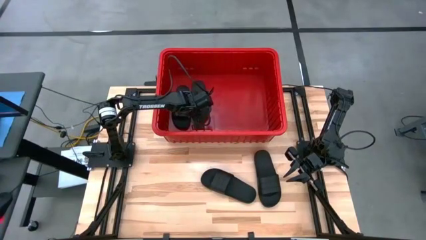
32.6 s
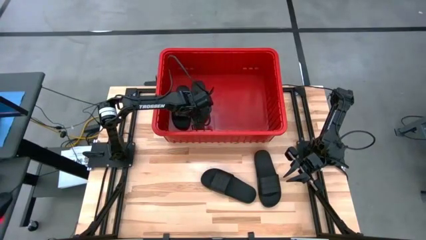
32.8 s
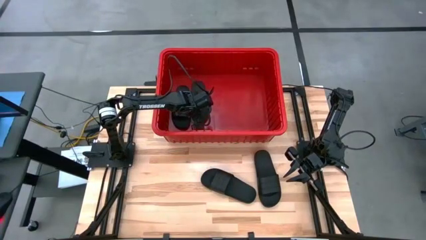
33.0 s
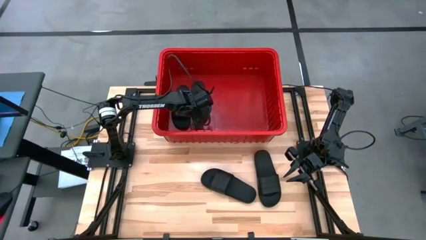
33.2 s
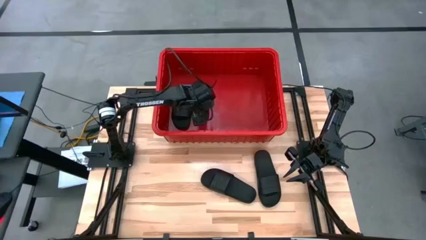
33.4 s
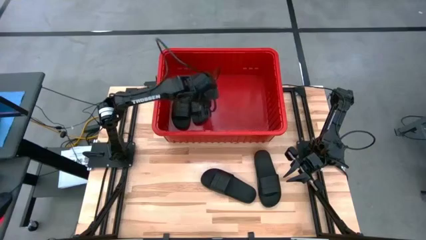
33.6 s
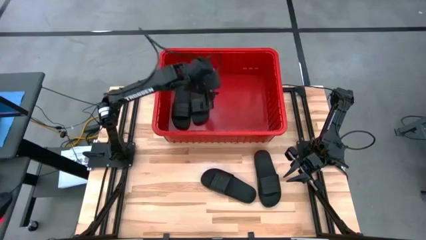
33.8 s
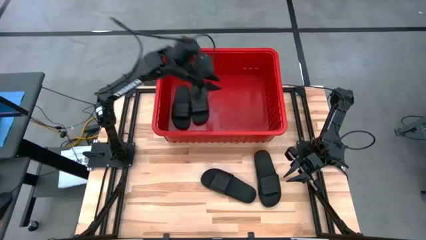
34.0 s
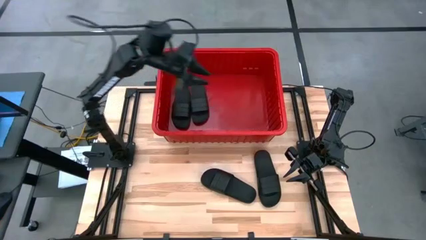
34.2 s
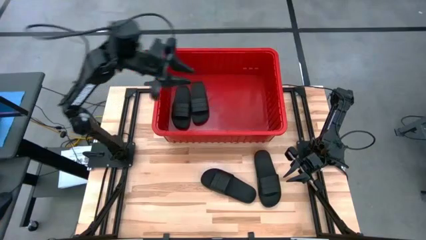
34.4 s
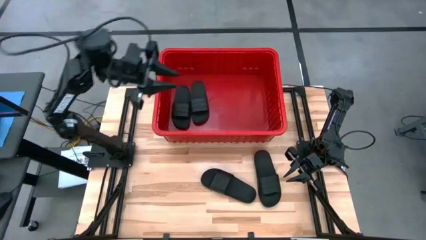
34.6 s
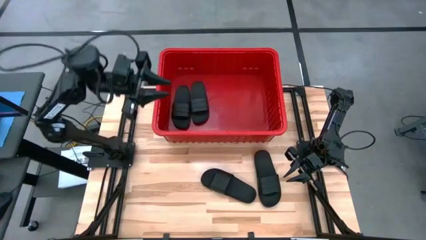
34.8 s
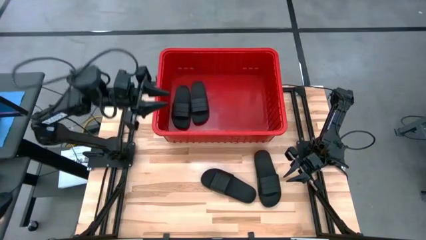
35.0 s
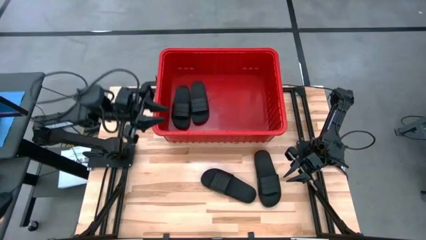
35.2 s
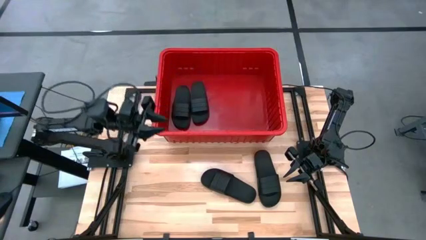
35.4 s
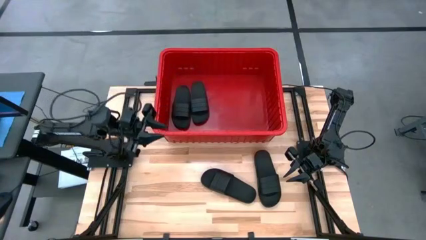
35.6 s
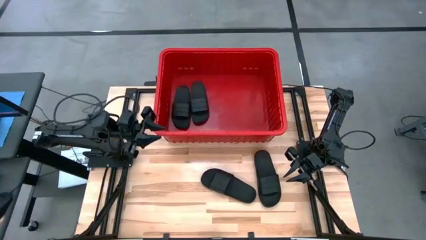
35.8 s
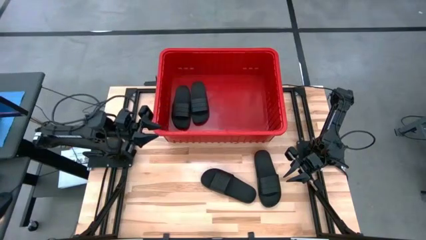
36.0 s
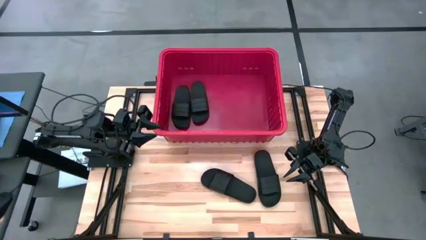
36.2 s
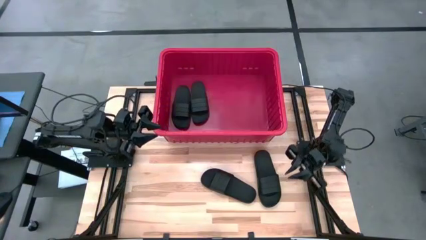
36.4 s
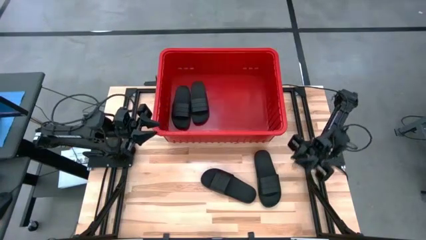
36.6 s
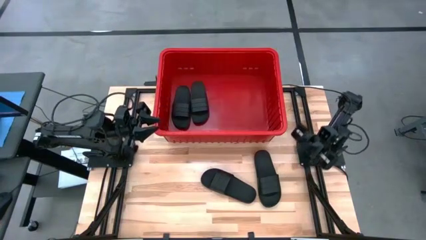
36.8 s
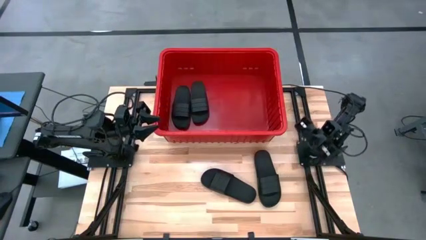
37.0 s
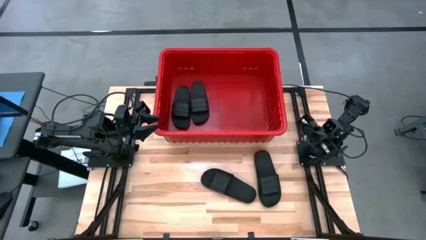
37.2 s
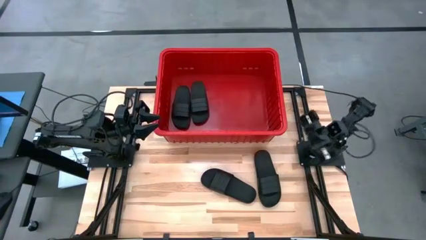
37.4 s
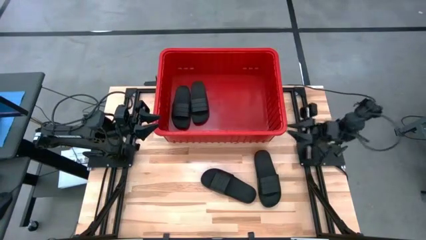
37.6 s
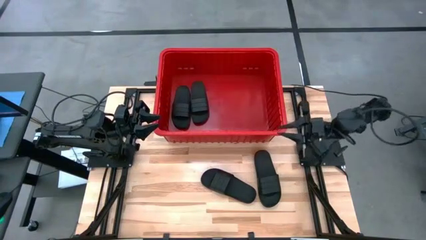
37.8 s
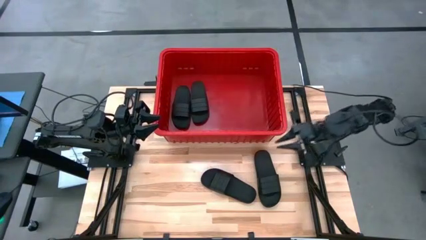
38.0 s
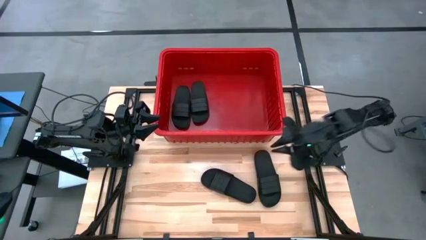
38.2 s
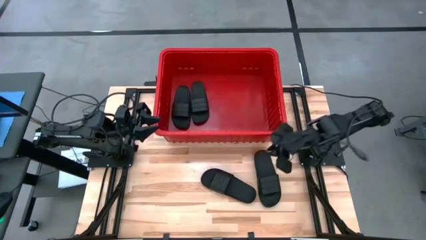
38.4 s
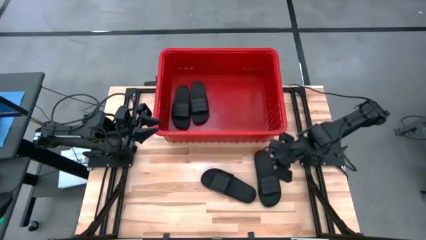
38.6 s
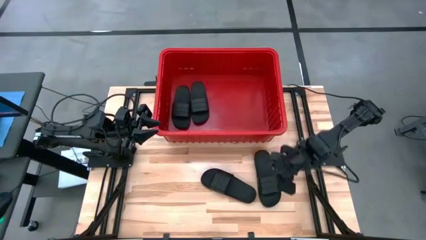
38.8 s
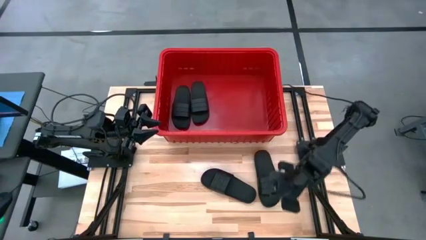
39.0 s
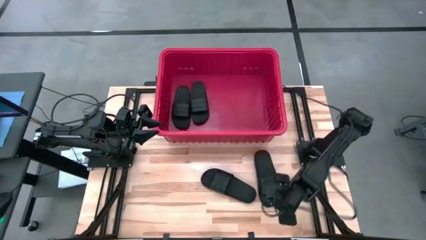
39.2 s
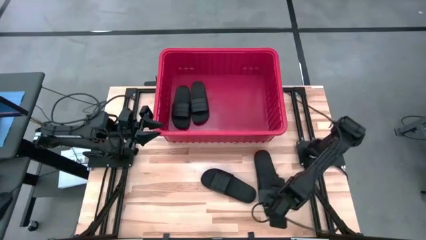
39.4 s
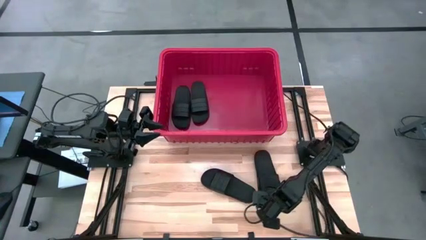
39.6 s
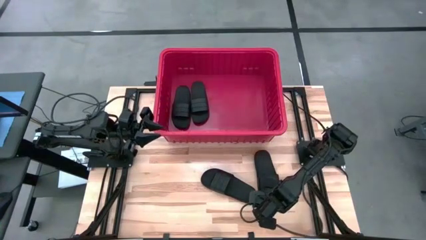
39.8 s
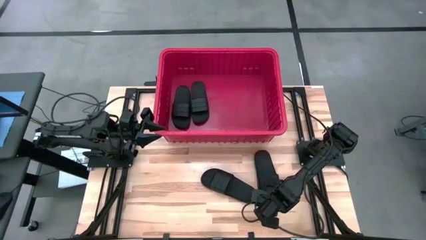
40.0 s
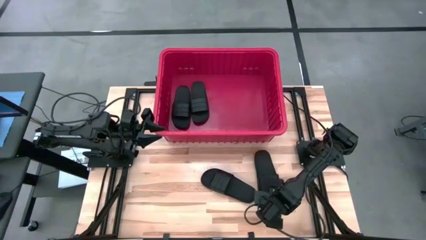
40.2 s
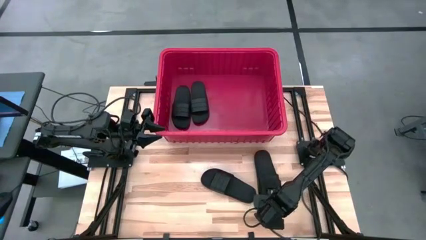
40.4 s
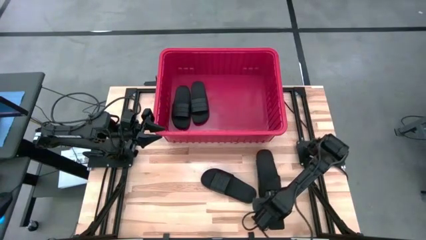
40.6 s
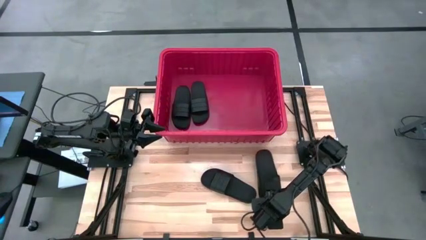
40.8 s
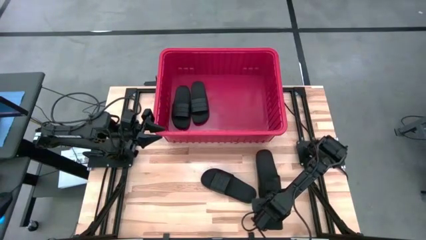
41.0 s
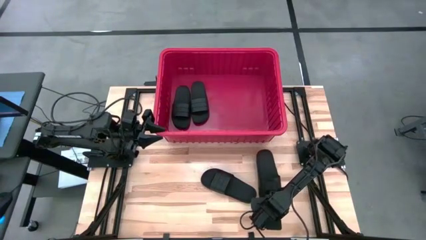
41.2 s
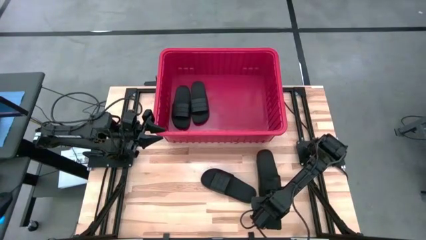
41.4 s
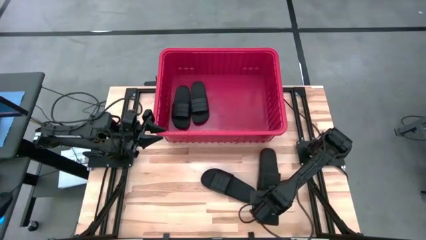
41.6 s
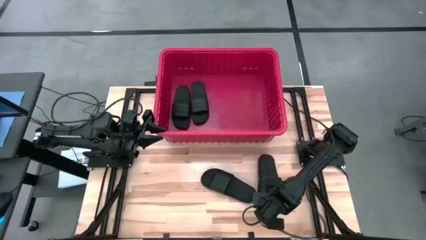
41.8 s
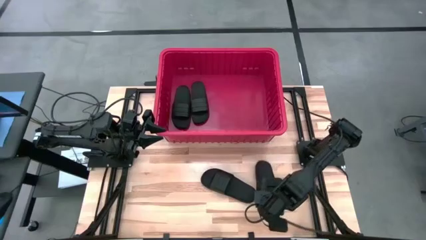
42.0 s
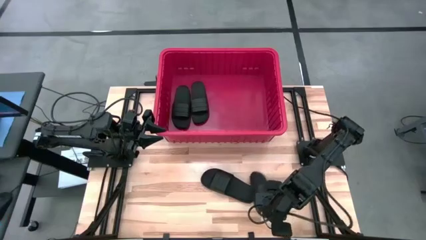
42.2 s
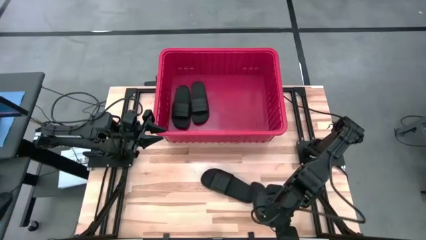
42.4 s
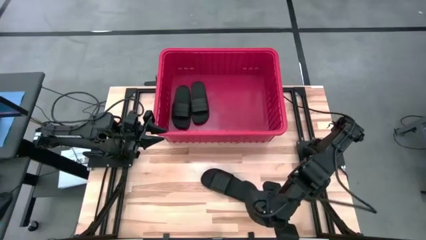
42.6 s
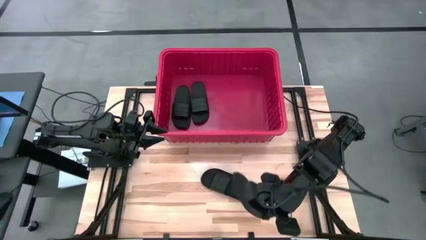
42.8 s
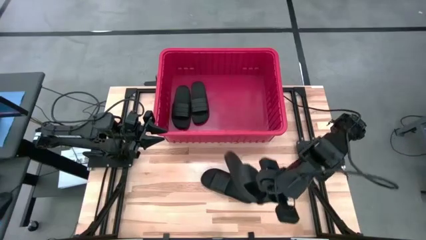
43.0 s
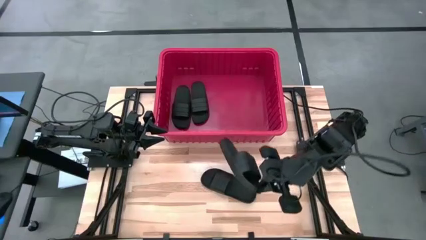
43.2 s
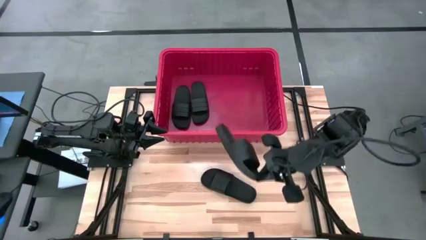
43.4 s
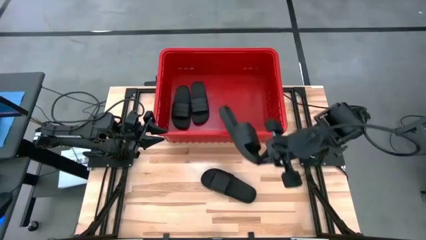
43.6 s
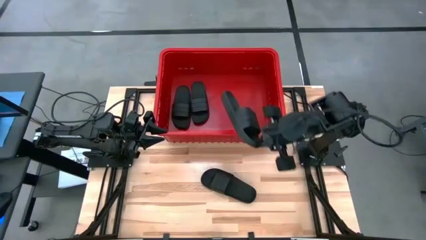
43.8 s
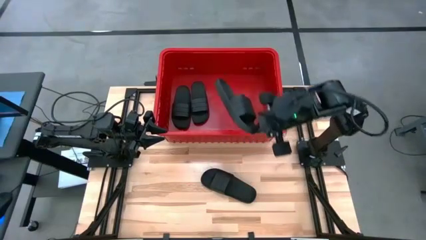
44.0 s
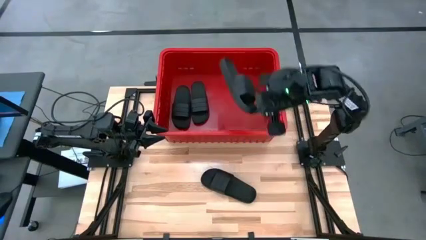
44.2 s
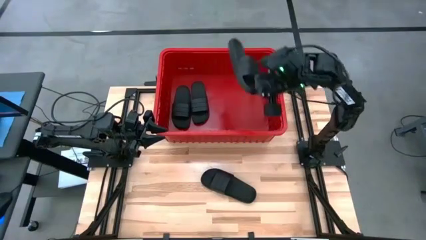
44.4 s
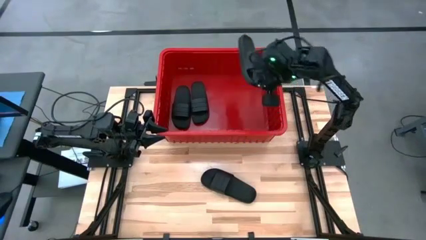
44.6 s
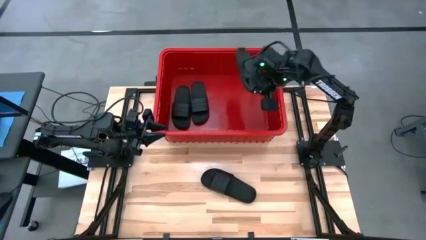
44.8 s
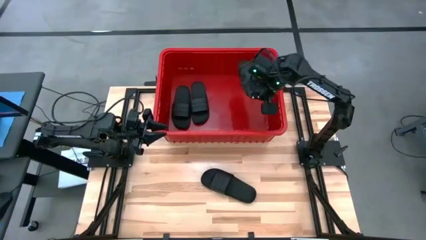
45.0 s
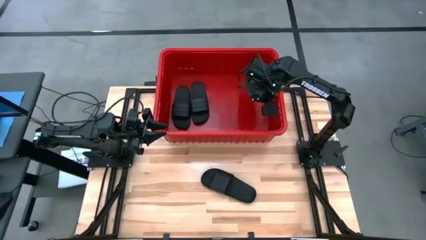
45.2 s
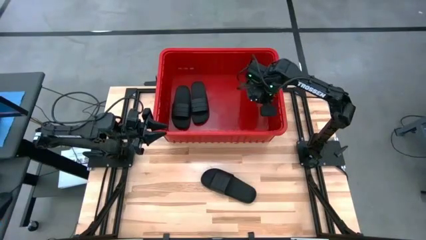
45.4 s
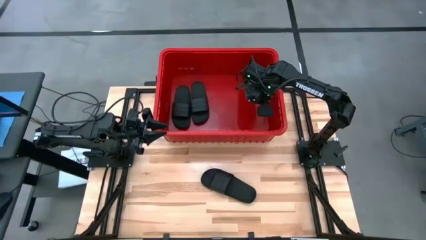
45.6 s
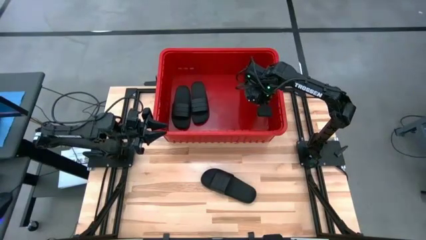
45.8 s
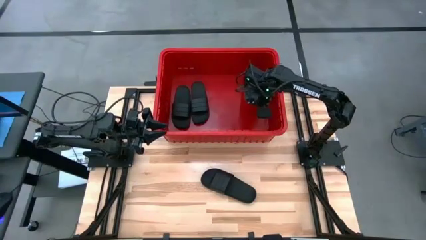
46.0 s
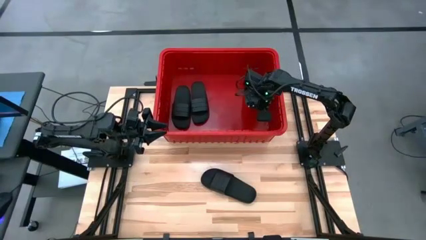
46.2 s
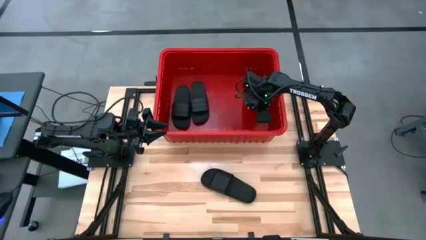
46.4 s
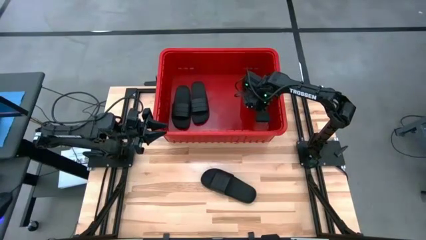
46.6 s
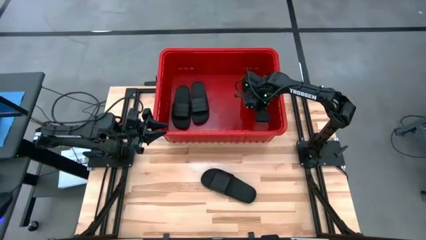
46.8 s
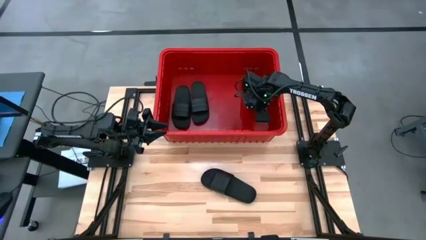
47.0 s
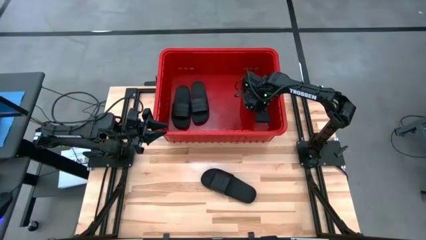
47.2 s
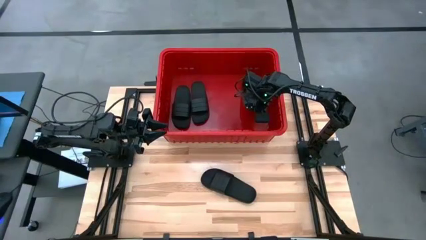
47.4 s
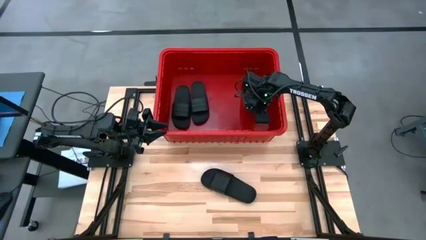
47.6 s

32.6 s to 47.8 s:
Task: Pick and place slides into bin
Put the black slide into the red bin

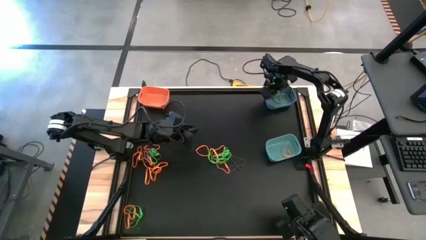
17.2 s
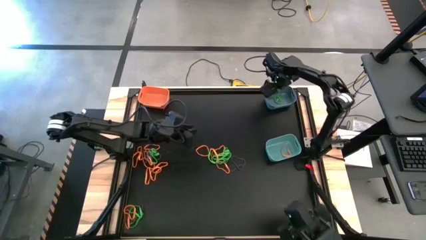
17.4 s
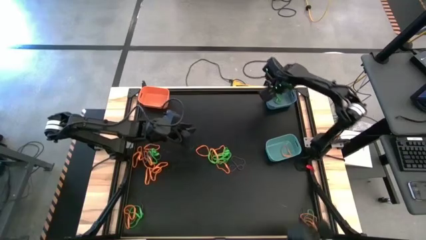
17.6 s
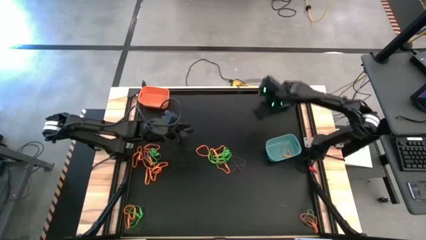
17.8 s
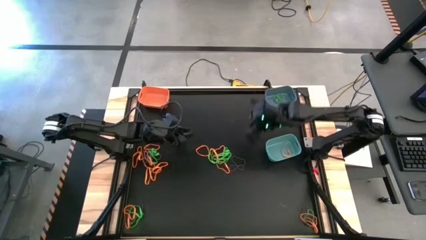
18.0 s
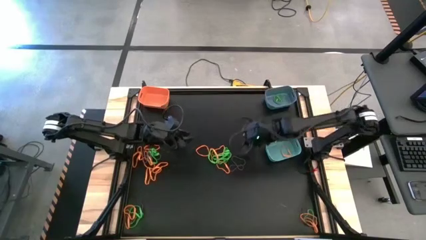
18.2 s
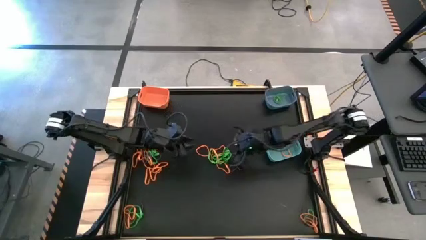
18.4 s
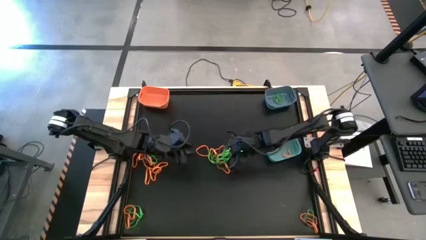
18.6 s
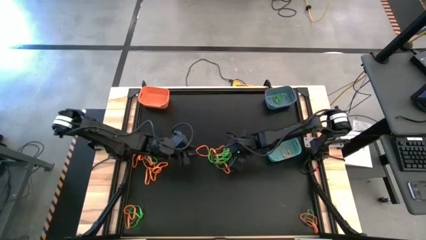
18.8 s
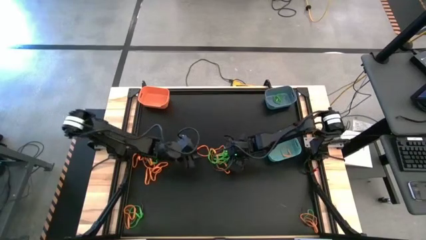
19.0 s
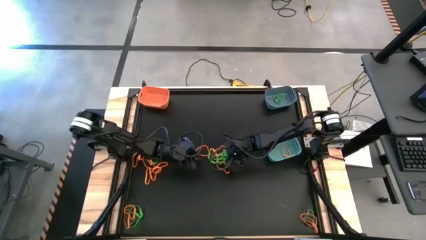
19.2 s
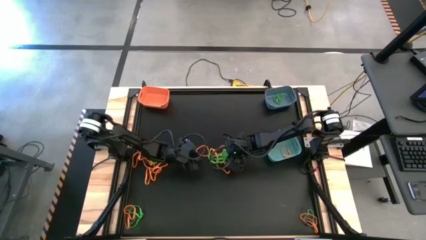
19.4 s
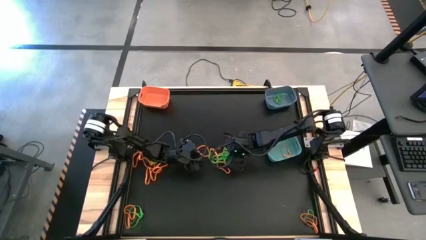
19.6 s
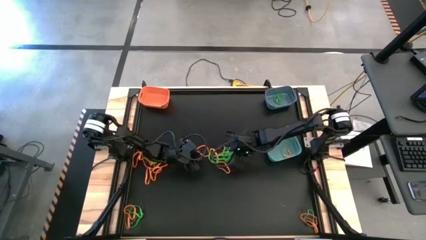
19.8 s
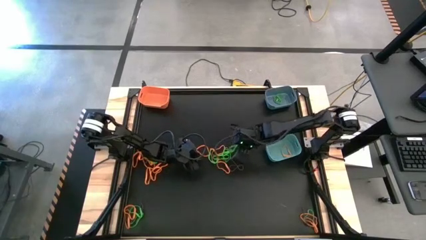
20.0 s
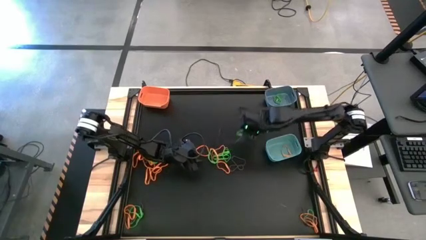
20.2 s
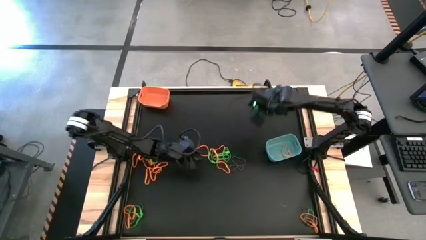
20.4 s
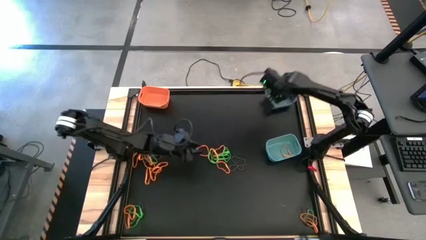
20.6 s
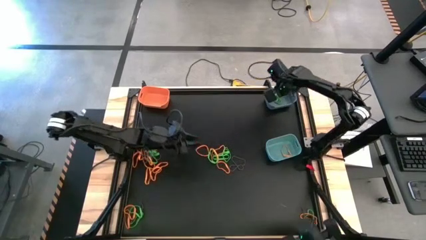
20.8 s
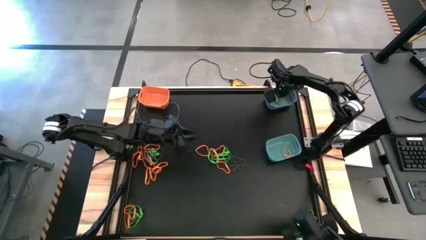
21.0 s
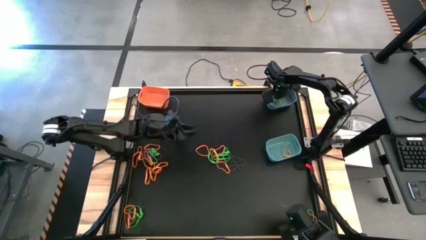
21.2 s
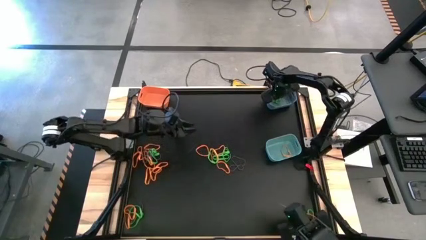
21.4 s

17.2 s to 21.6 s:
Task: Sort rubber bands into baskets
Put the green rubber band into the blue bin
